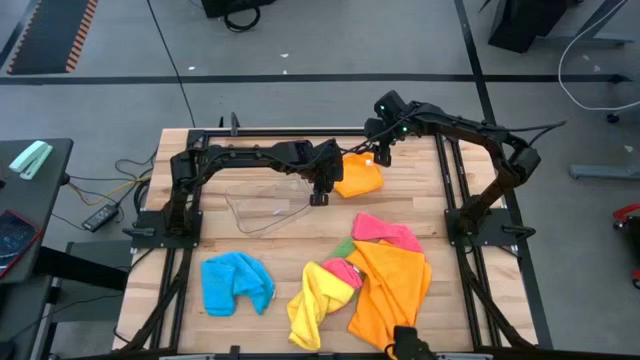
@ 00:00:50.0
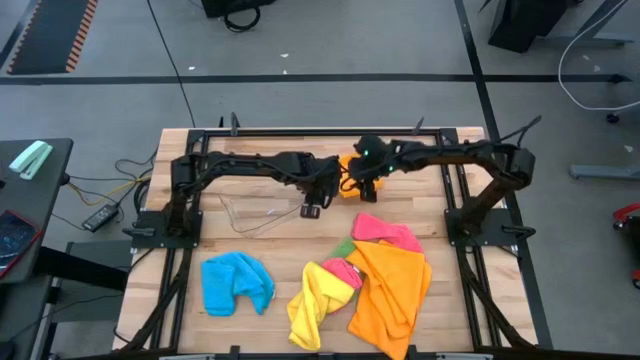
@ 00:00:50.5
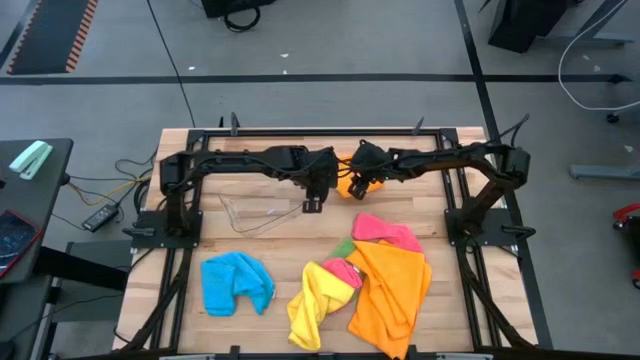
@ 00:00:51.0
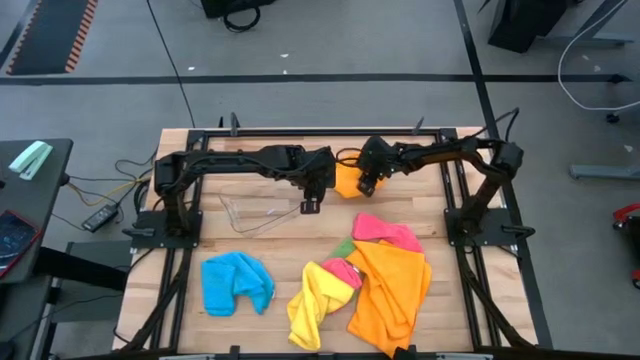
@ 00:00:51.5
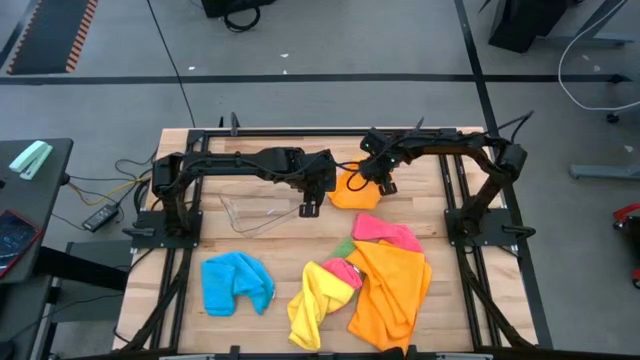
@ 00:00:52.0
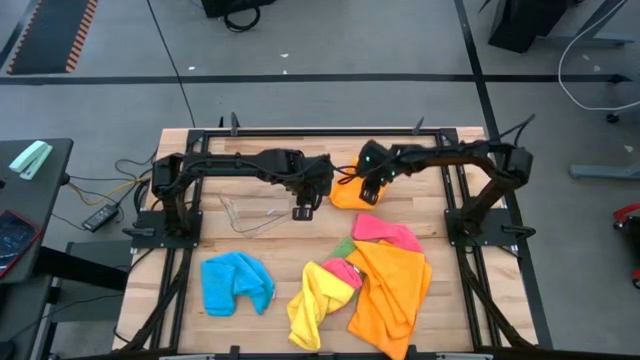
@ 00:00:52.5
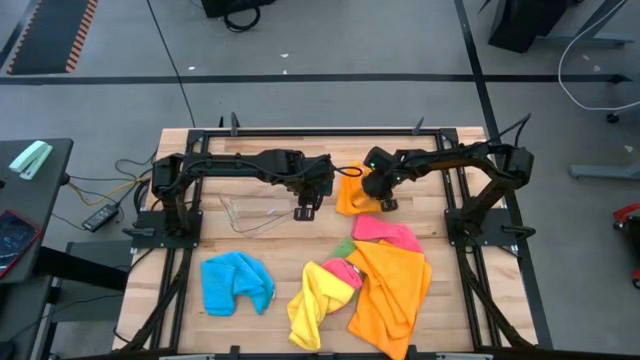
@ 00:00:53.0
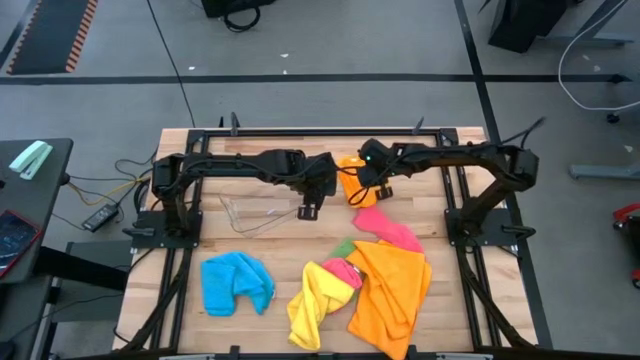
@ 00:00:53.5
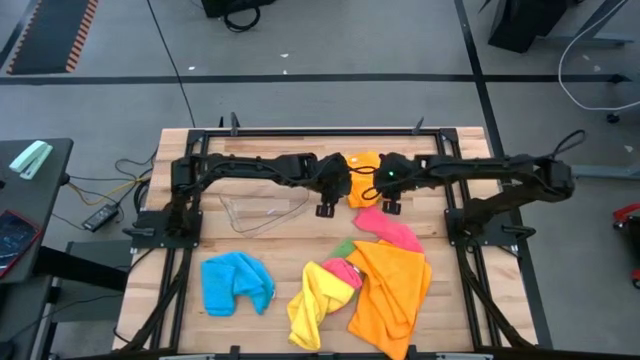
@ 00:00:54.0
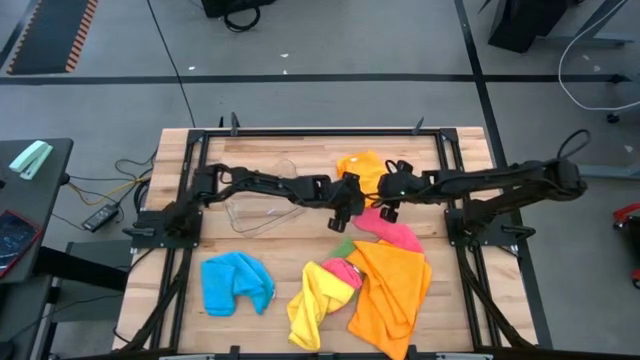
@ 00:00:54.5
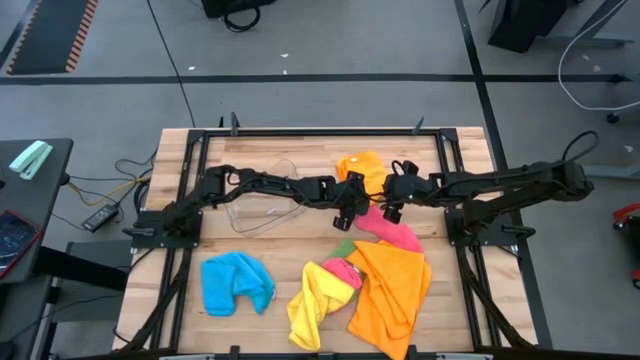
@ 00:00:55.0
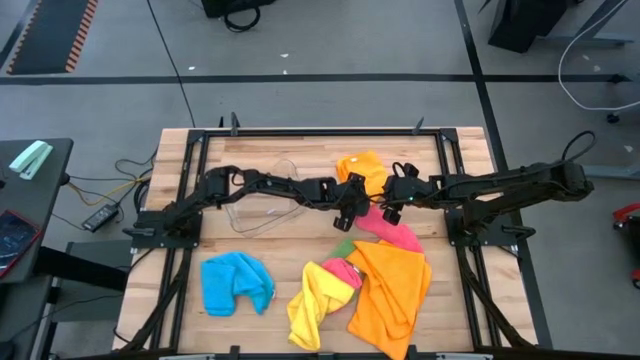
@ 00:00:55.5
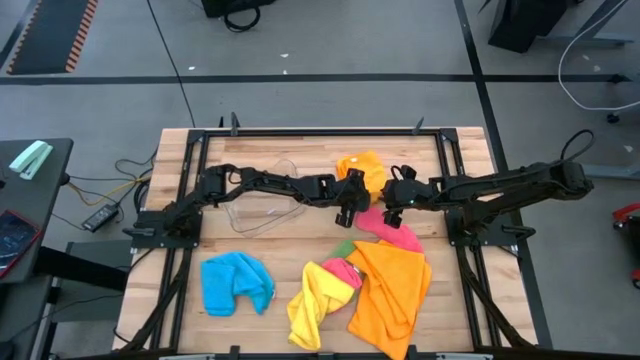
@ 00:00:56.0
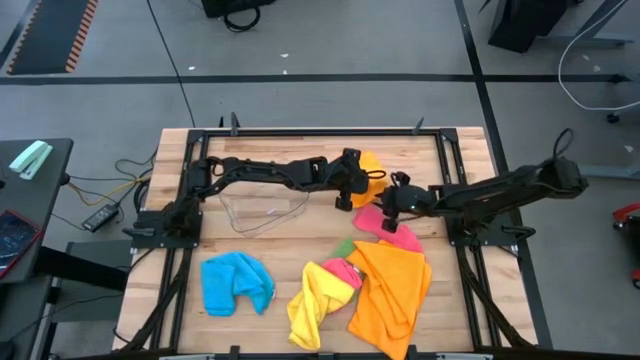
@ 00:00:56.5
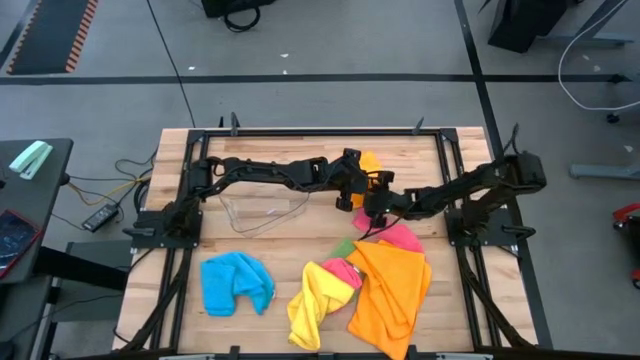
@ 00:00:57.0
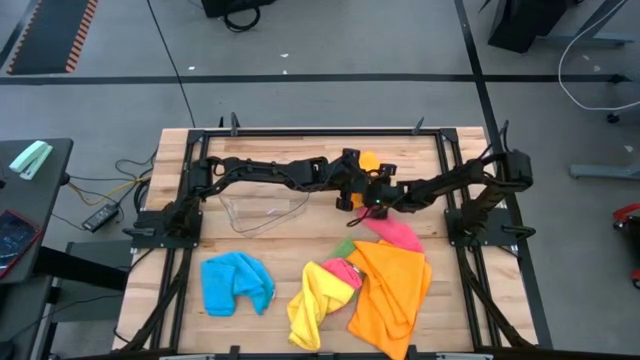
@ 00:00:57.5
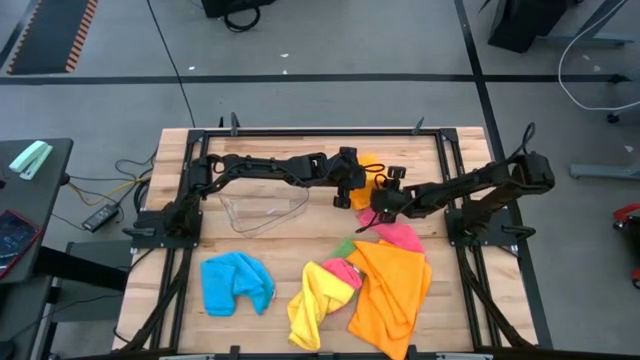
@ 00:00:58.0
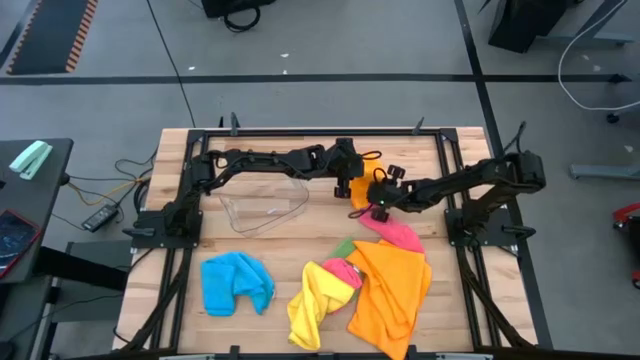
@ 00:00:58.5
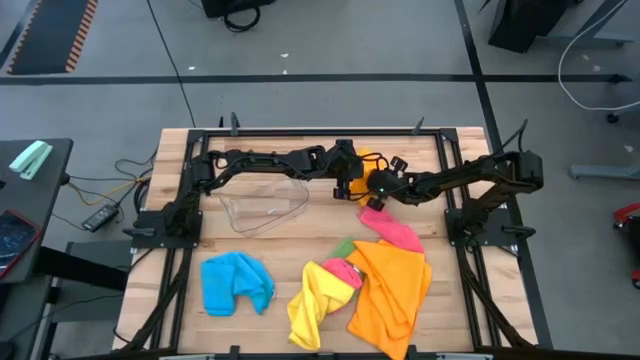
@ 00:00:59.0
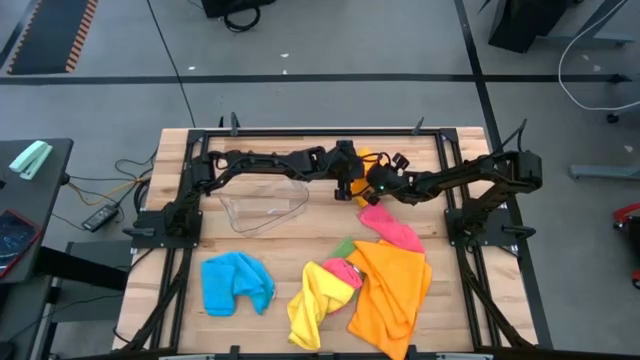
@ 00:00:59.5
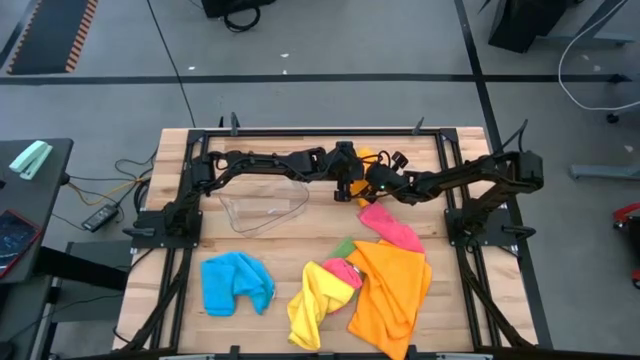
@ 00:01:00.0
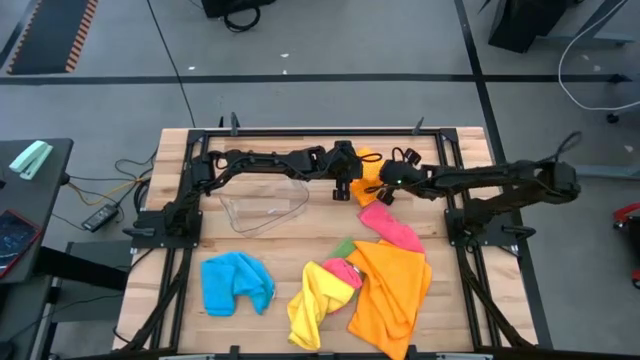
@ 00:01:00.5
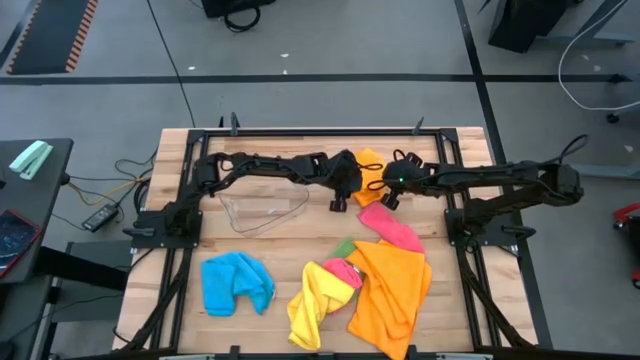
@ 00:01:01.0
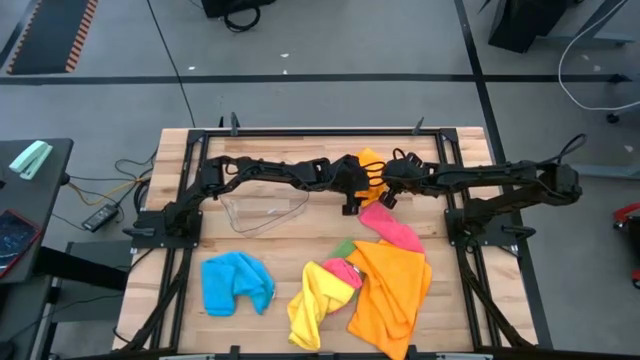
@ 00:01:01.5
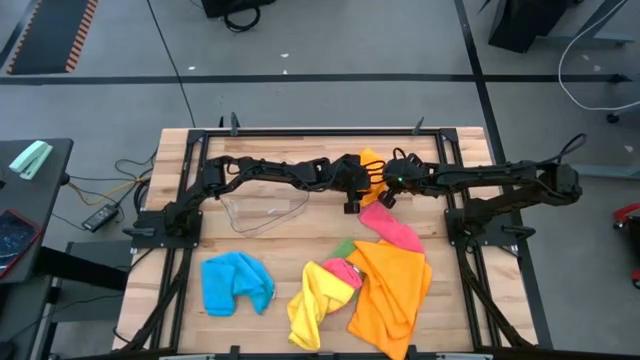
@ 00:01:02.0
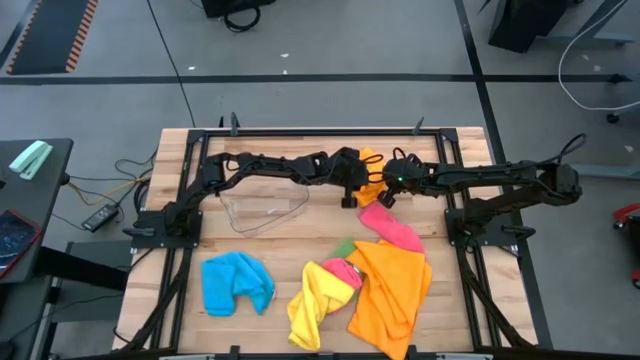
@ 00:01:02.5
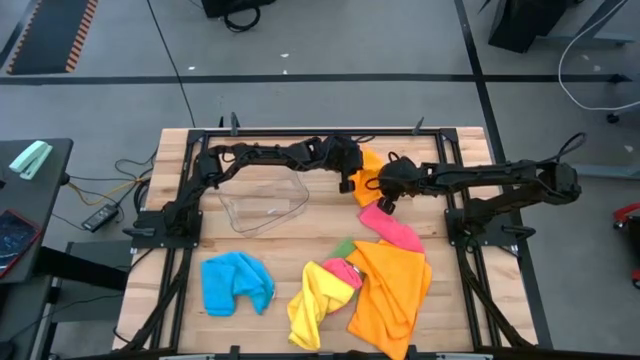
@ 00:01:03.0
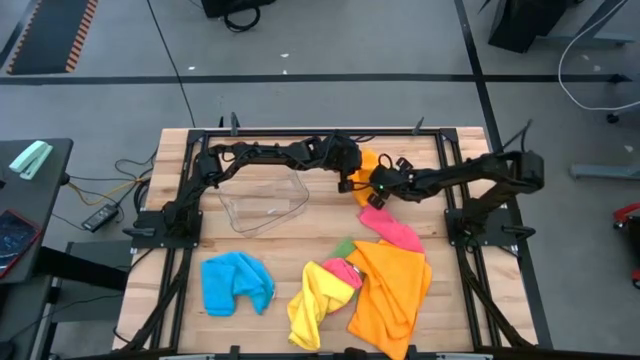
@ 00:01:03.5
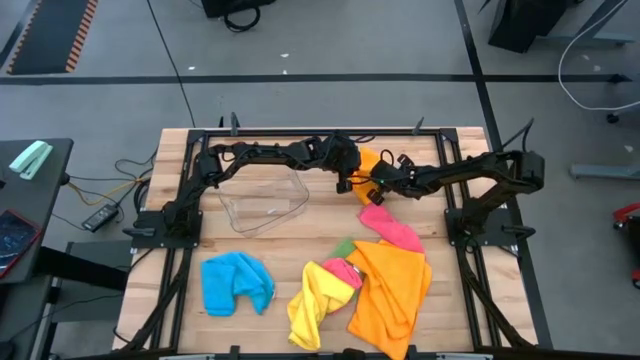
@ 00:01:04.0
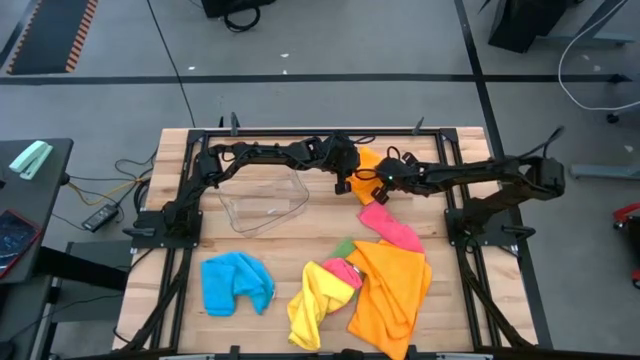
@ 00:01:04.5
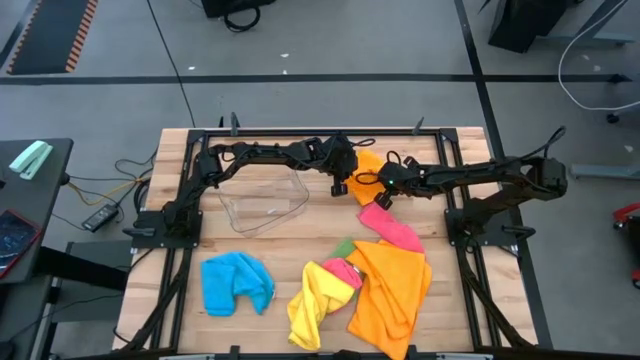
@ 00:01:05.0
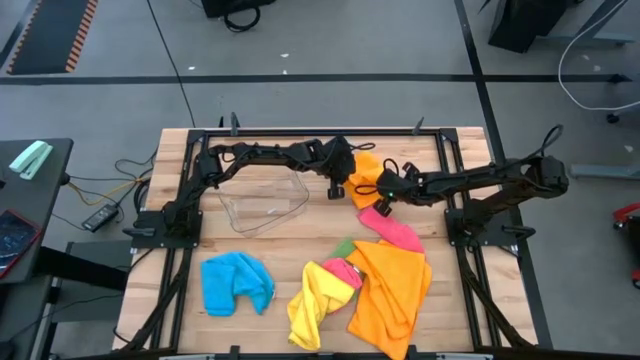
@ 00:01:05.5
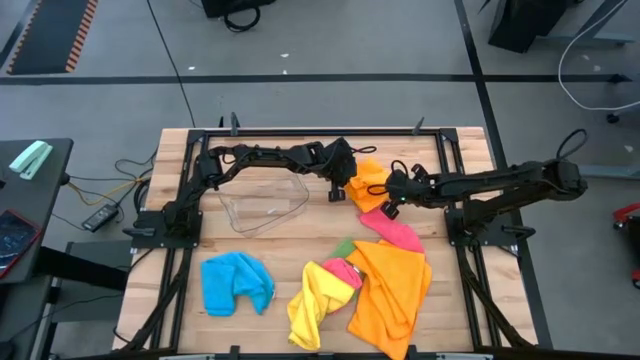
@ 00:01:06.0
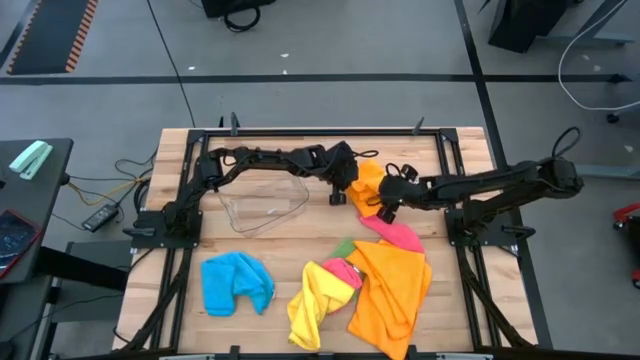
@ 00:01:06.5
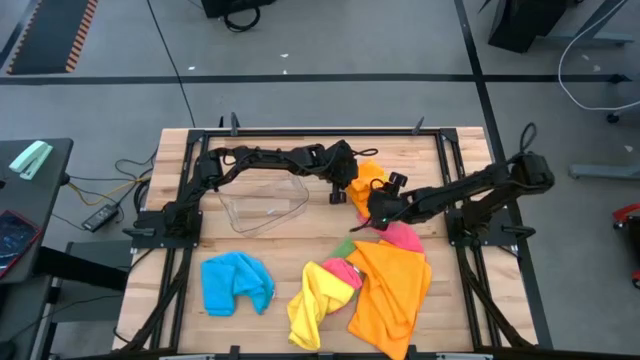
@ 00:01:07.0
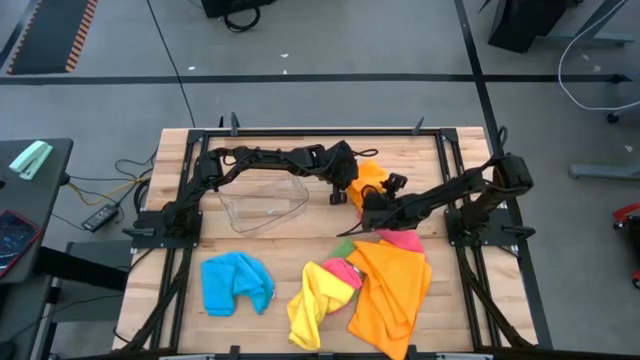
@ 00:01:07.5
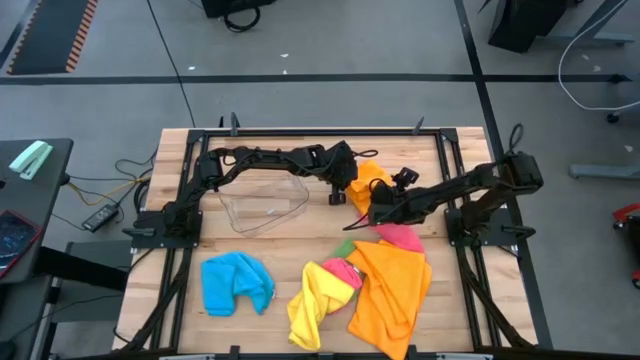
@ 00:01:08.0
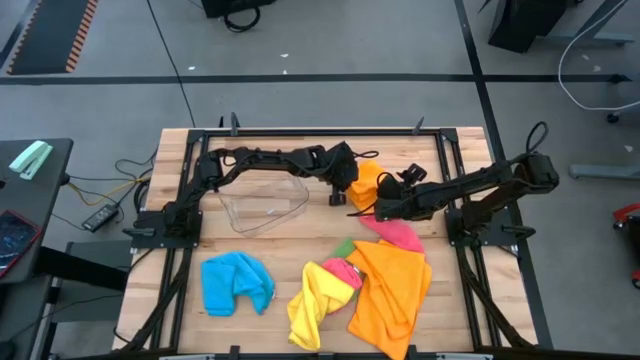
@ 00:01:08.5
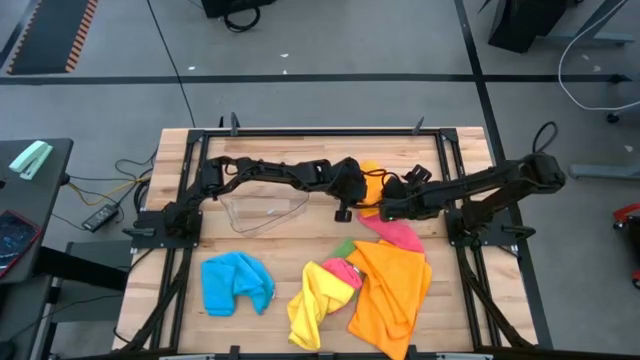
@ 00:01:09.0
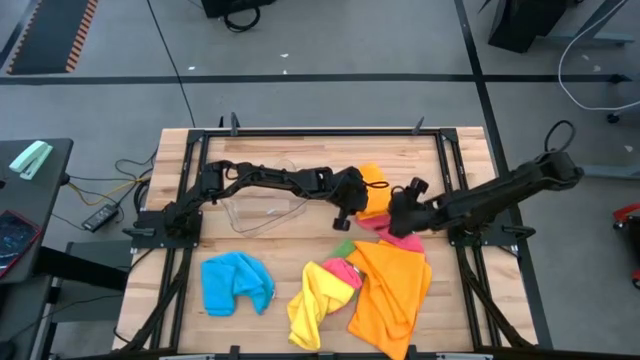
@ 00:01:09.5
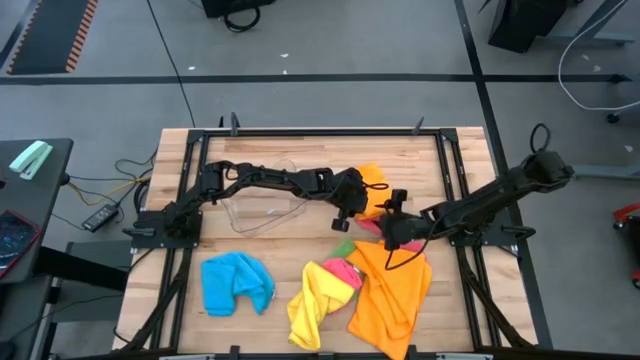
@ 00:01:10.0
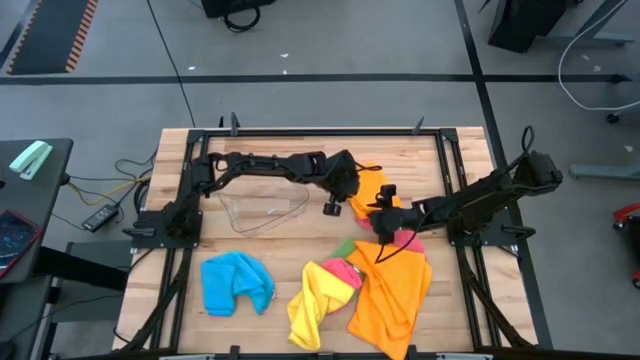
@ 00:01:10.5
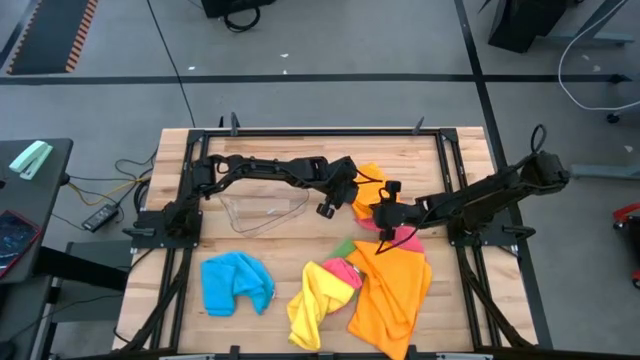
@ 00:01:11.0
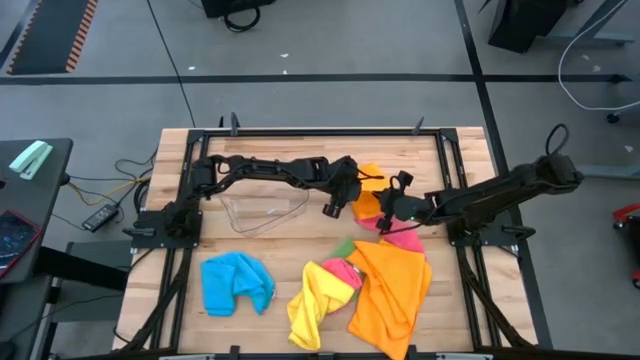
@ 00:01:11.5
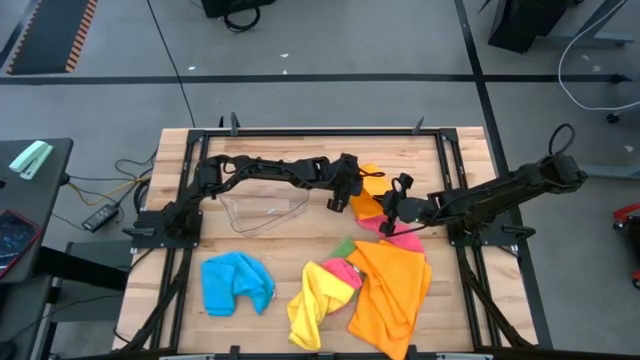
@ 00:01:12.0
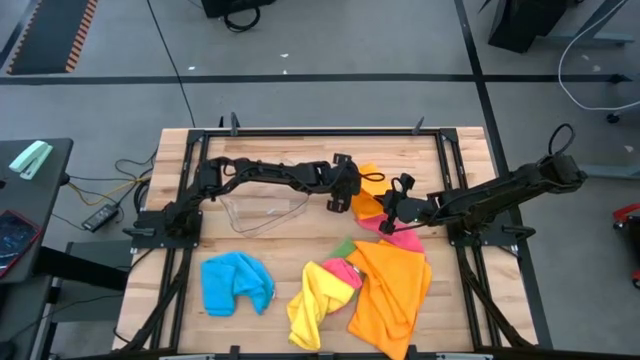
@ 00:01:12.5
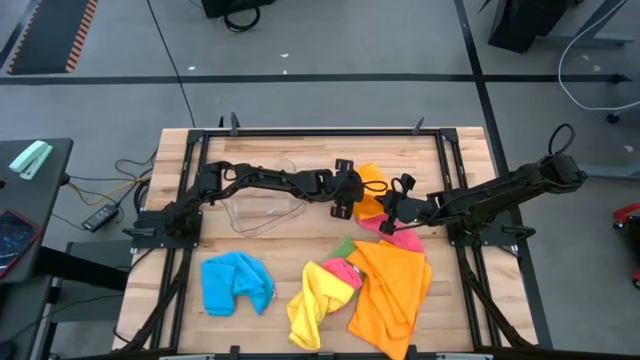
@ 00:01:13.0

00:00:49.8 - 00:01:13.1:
Task: Fold microfiber towels
Fold the orange microfiber towel
